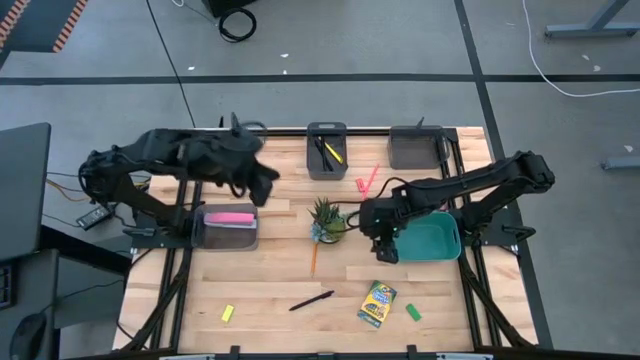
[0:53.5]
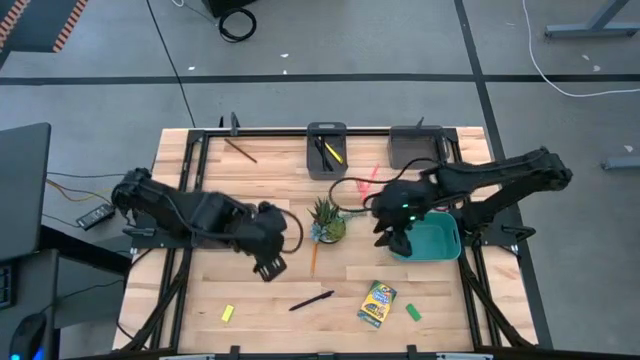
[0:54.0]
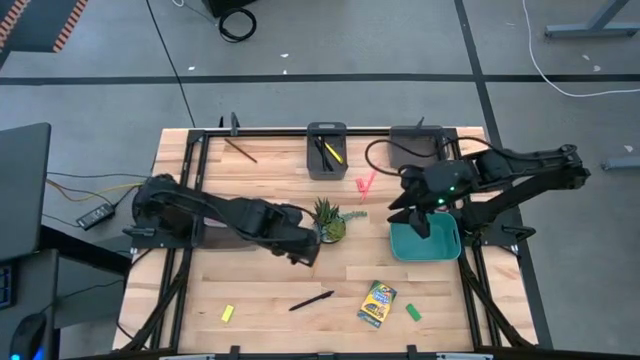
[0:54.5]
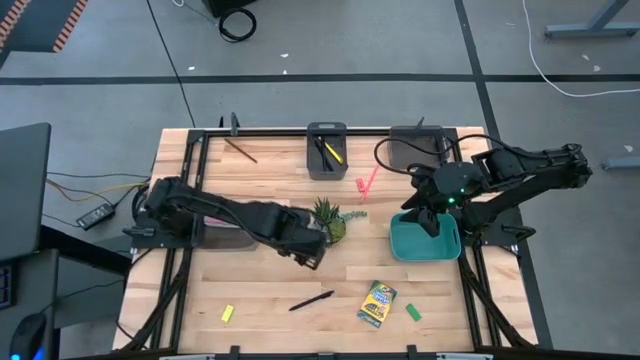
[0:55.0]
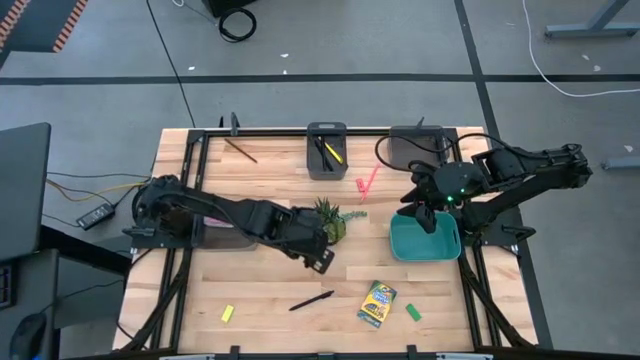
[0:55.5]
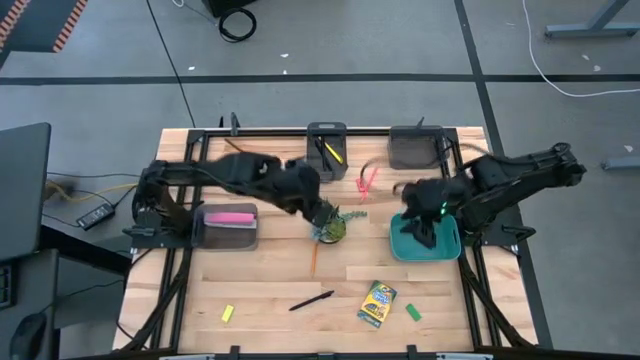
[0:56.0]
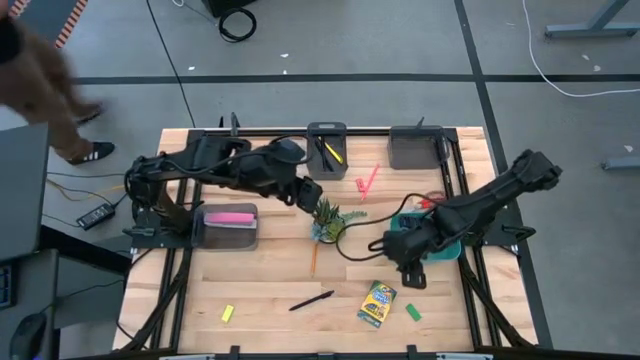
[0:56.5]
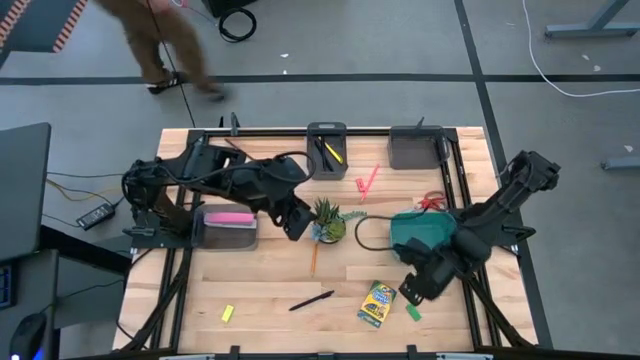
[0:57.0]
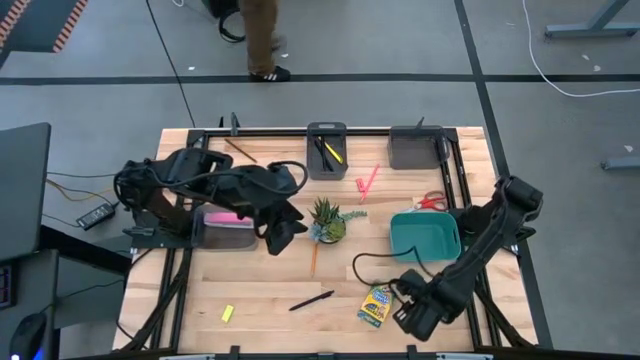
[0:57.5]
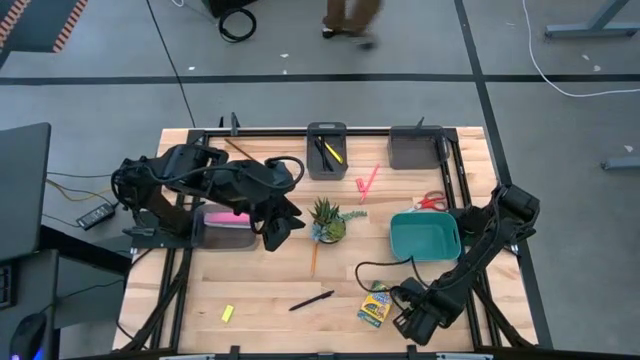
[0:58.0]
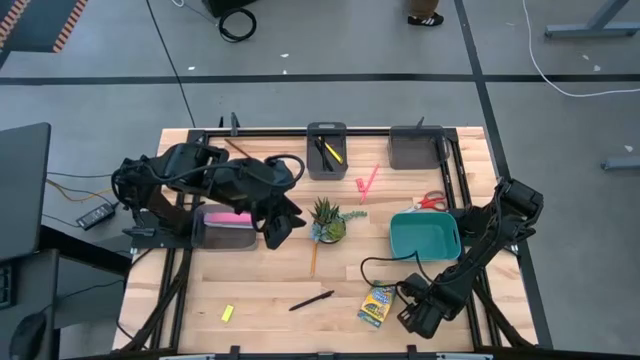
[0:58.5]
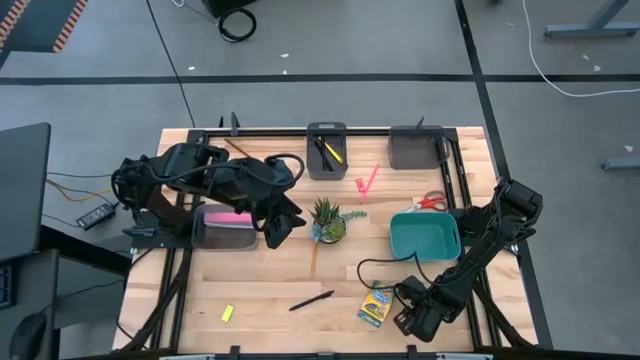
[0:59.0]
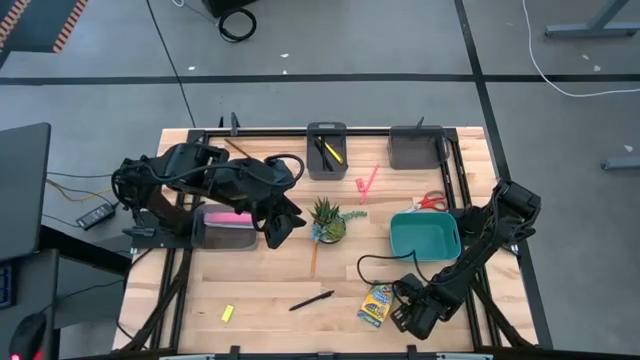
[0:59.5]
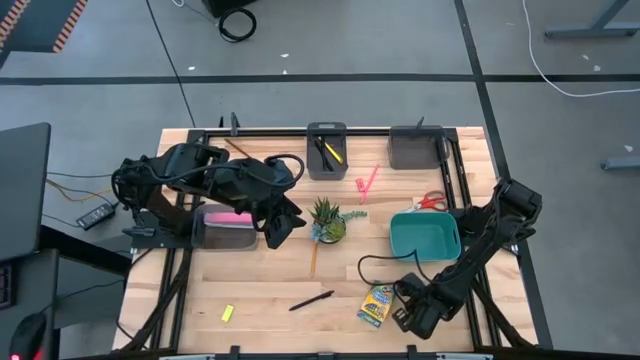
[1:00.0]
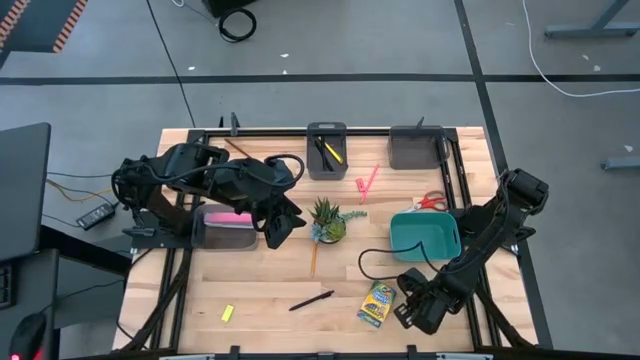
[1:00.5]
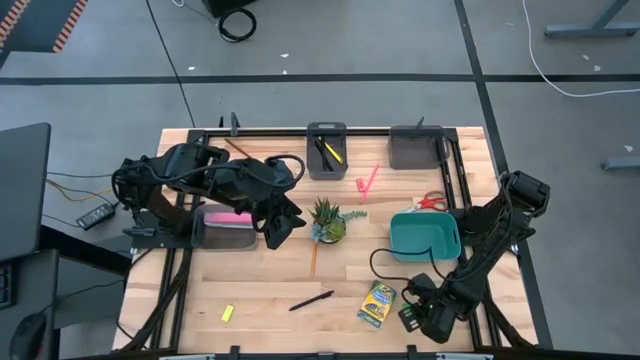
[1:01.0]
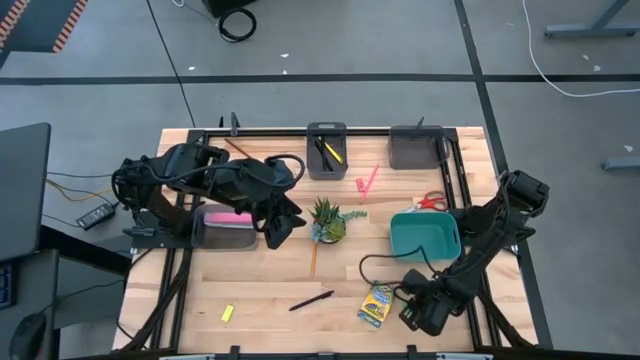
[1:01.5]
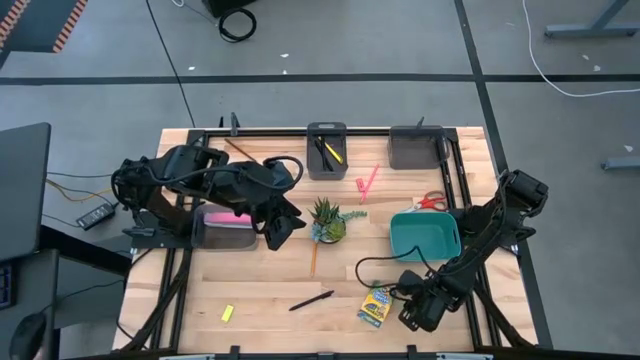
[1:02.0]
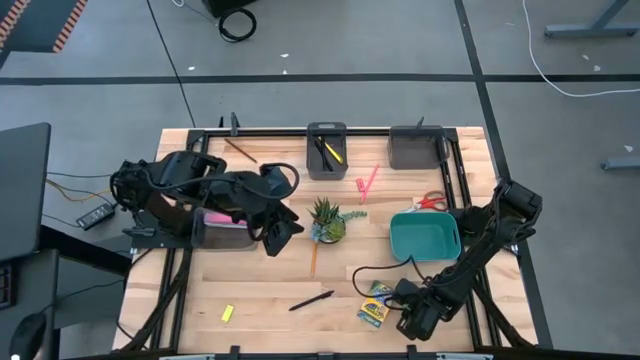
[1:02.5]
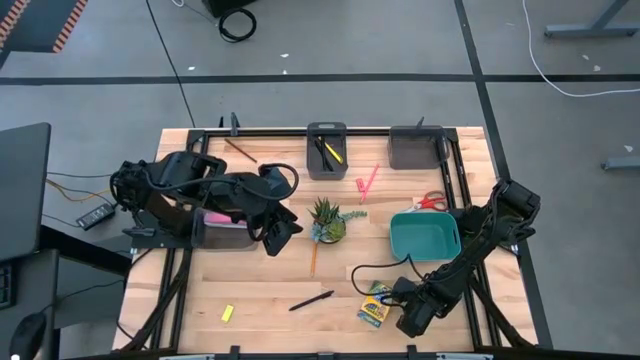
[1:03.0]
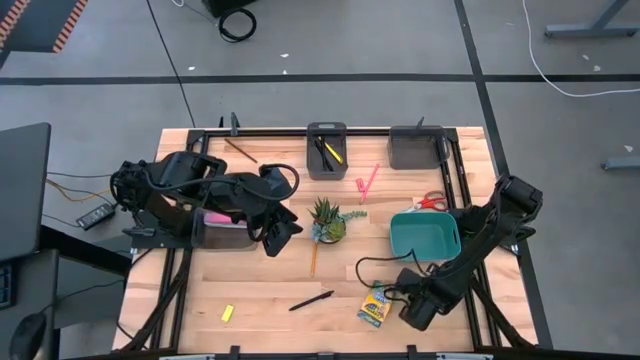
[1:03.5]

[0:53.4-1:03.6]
Task: Sort crayons/erasers/pens/pencils in bins
Put the green eraser into the green blue bin

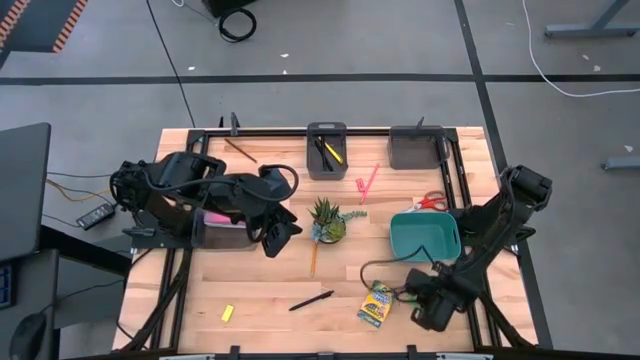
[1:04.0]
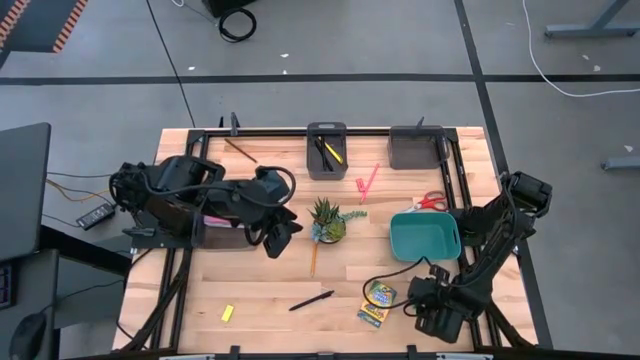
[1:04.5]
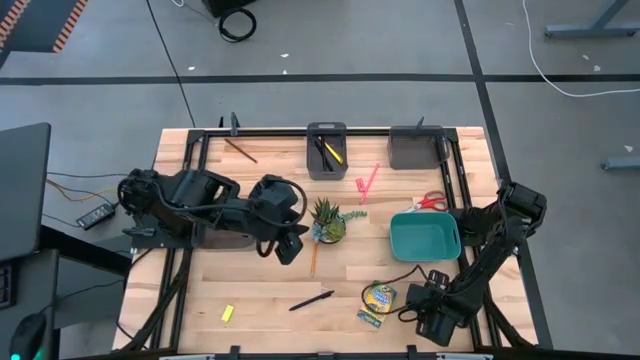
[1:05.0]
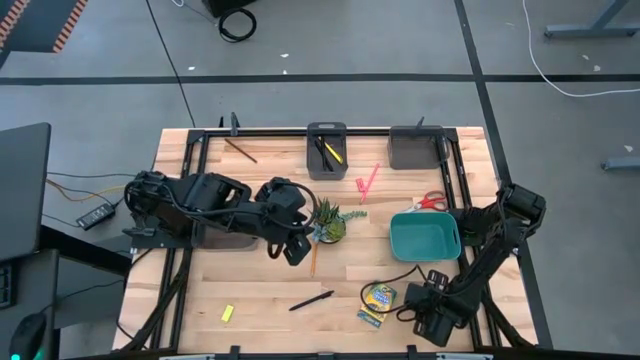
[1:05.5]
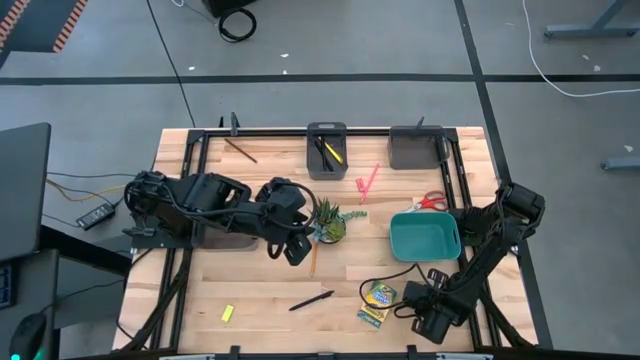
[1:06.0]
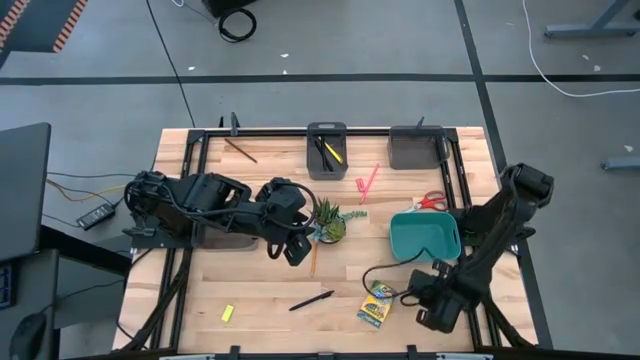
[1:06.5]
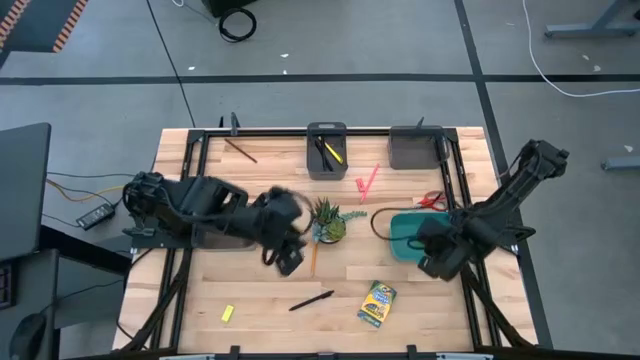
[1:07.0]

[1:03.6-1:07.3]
Put the green eraser into the green blue bin

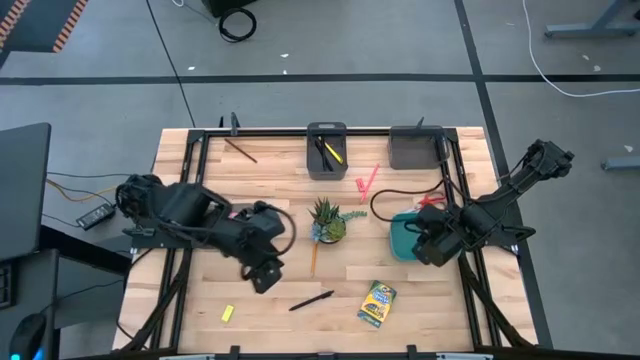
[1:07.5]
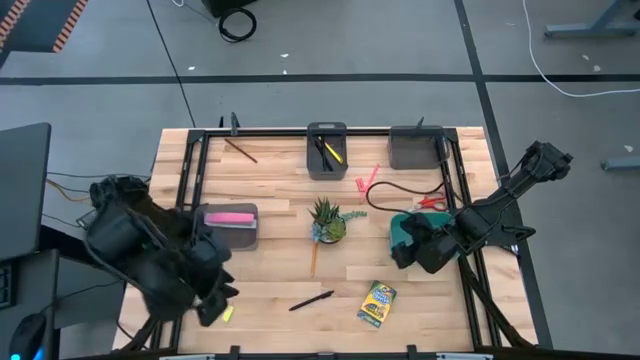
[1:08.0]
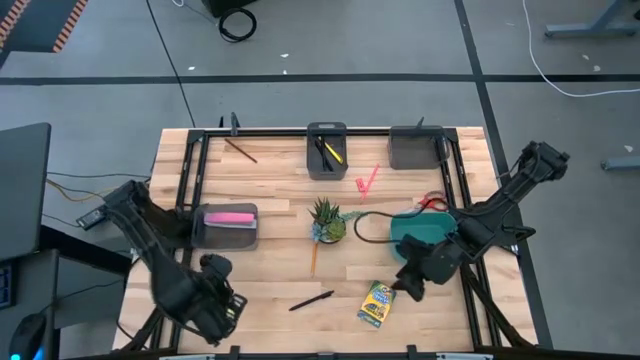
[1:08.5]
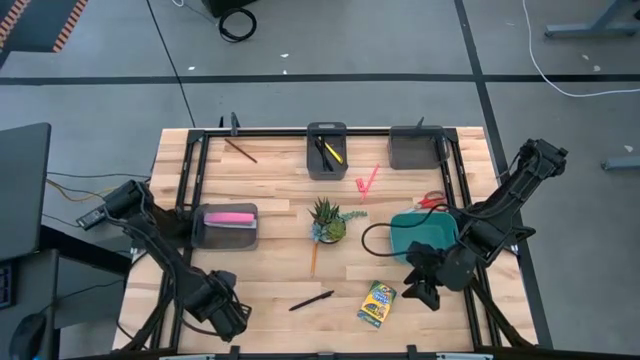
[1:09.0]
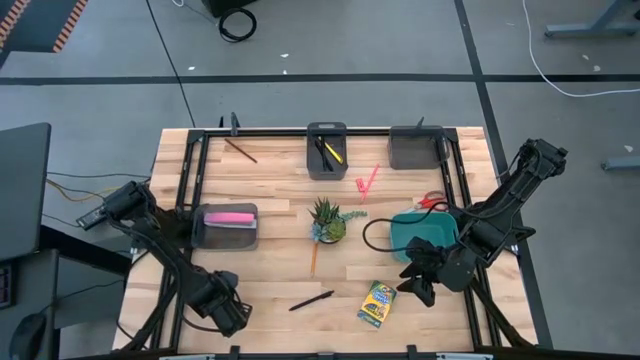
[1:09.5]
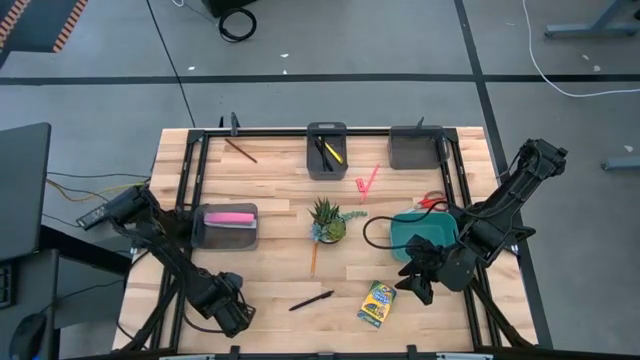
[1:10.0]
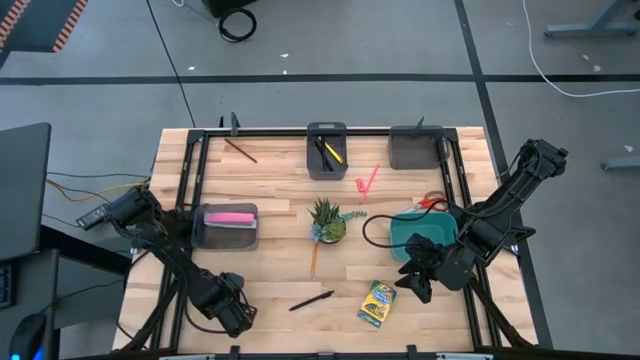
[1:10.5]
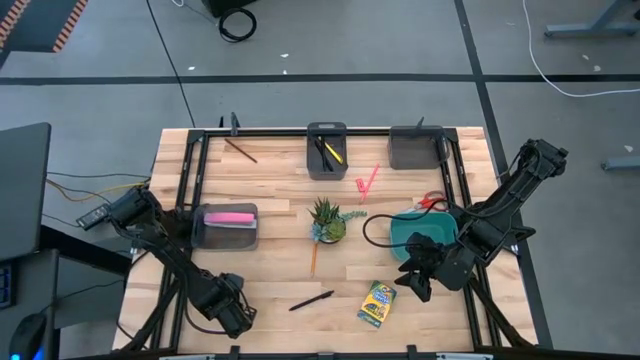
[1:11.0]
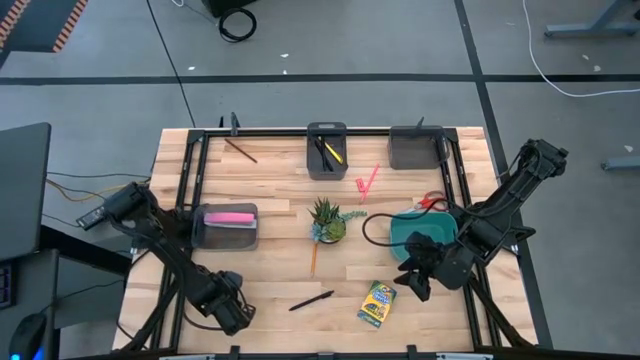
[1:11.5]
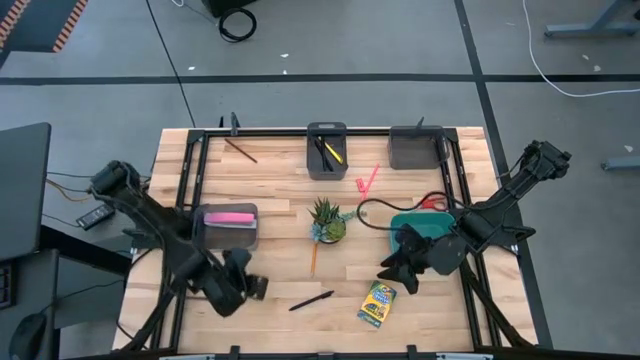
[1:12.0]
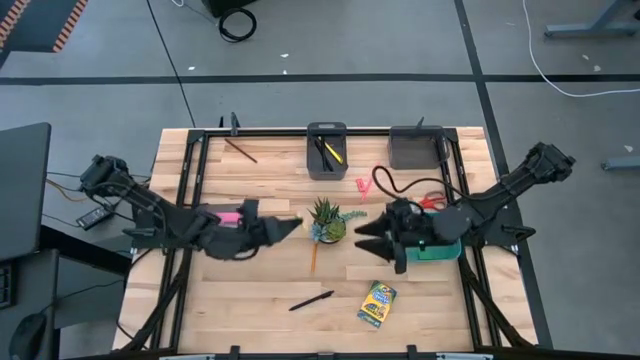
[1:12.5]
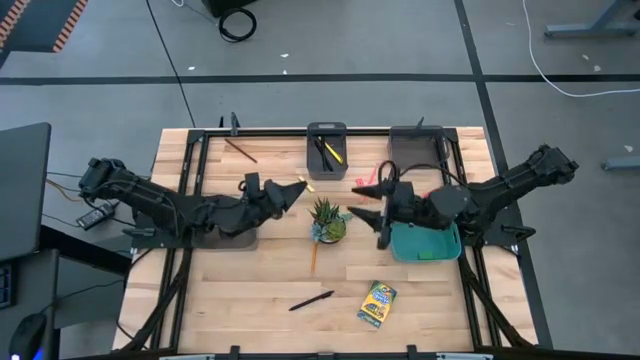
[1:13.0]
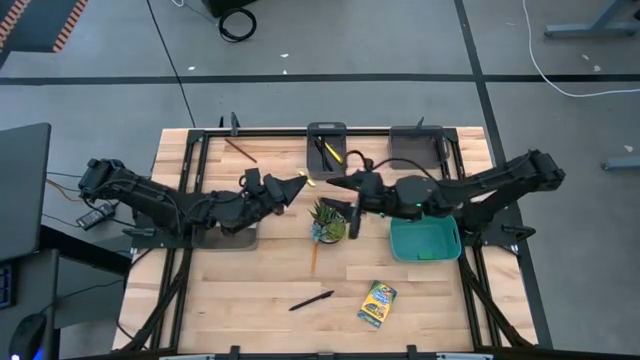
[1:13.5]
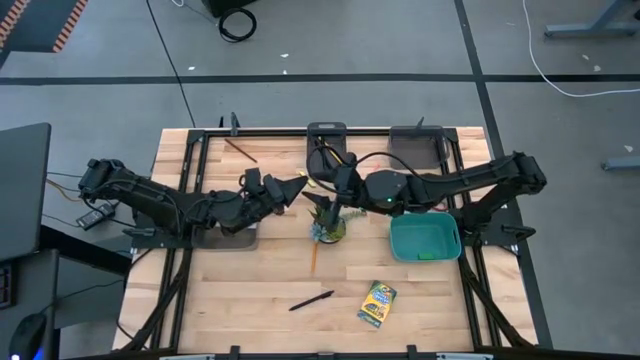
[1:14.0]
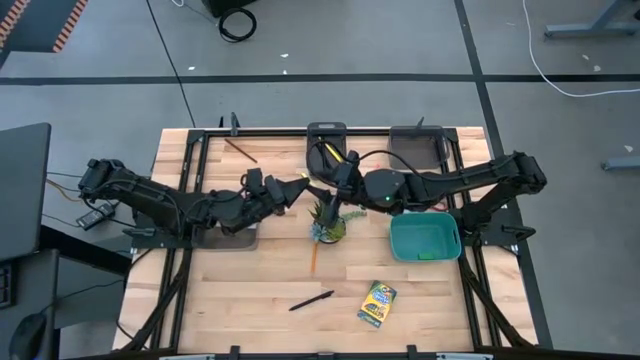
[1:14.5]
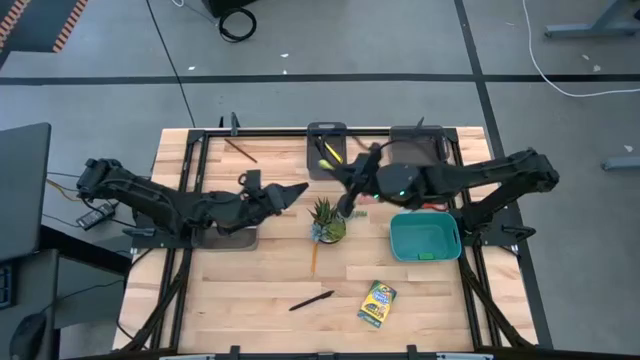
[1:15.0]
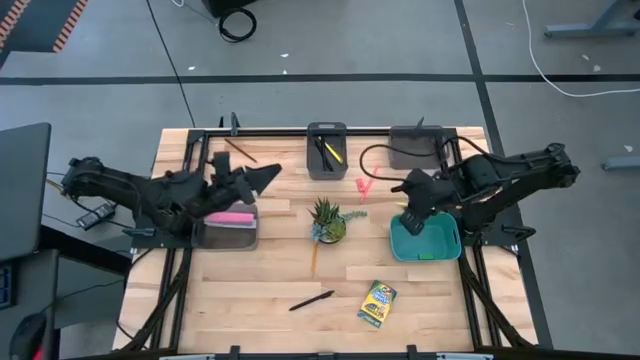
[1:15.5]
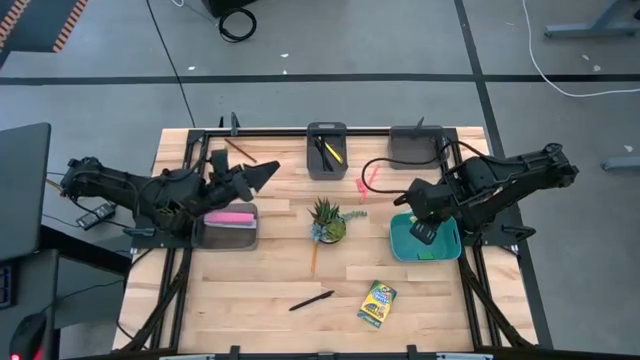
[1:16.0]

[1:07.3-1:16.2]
Put the light green eraser into the green blue bin
